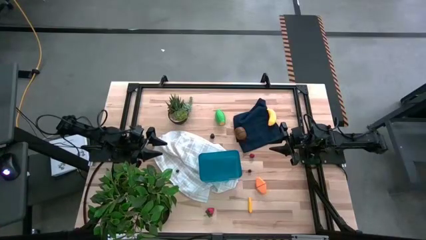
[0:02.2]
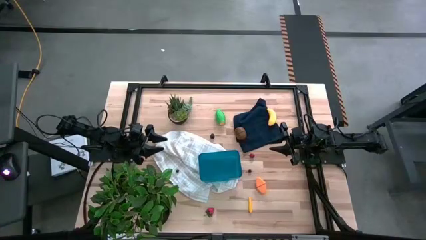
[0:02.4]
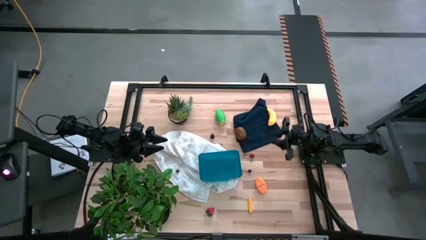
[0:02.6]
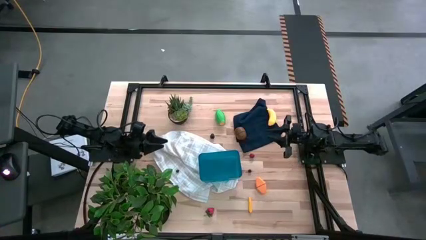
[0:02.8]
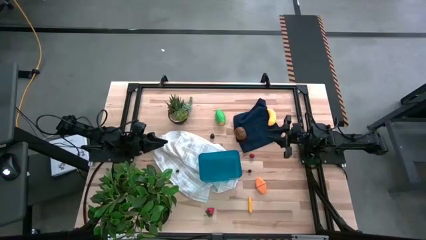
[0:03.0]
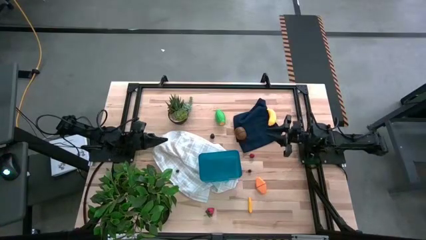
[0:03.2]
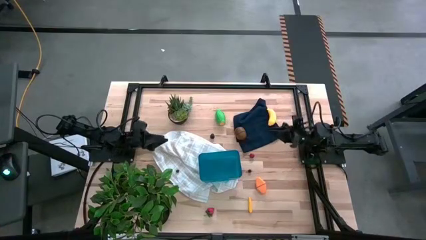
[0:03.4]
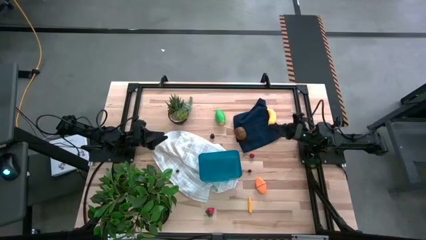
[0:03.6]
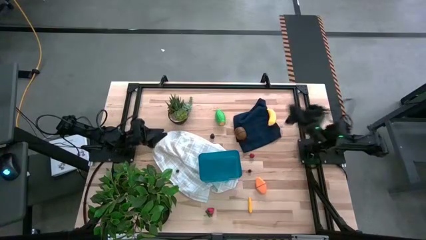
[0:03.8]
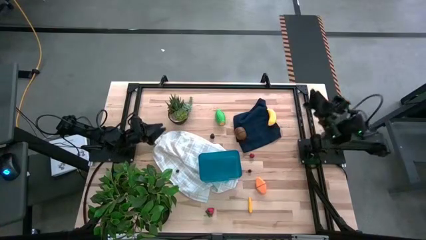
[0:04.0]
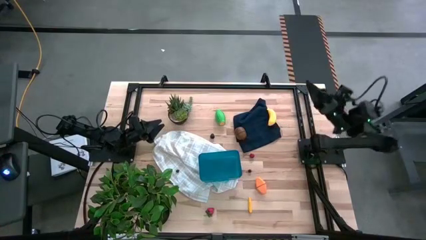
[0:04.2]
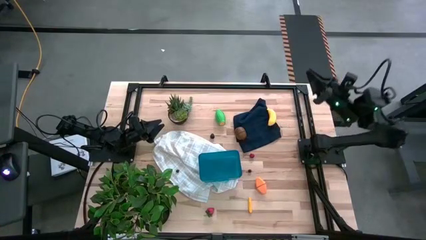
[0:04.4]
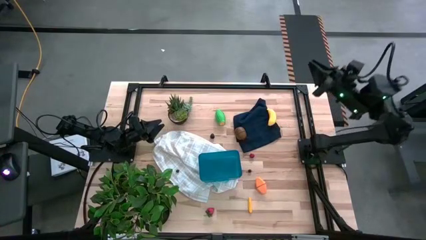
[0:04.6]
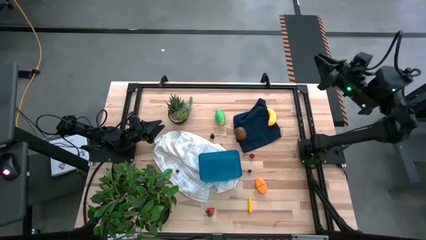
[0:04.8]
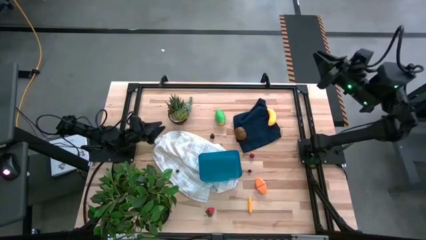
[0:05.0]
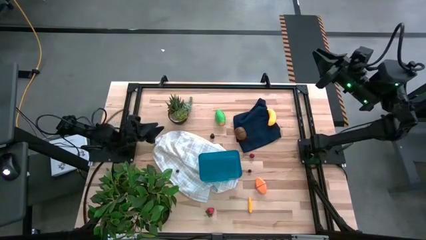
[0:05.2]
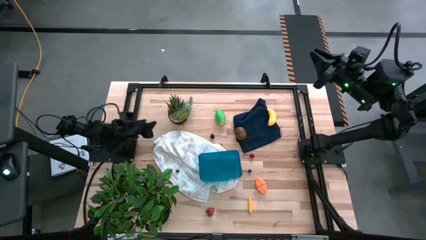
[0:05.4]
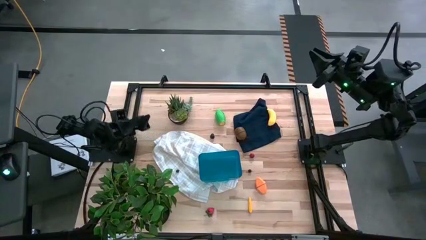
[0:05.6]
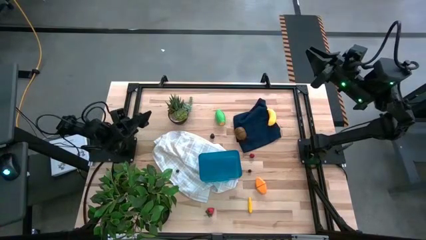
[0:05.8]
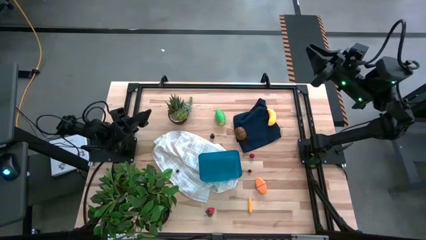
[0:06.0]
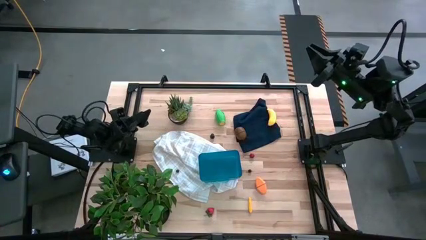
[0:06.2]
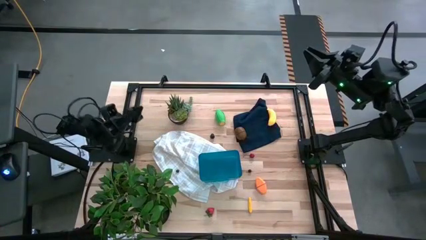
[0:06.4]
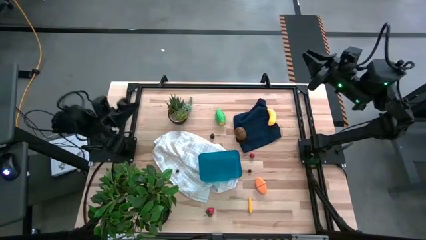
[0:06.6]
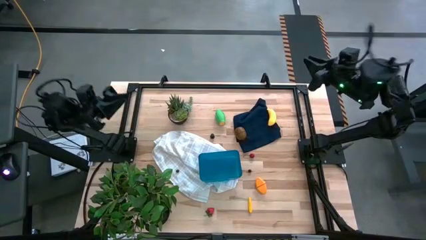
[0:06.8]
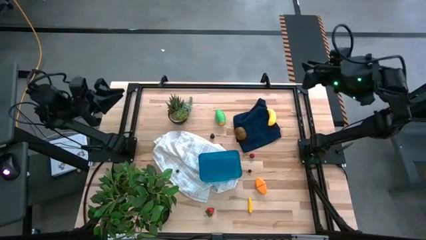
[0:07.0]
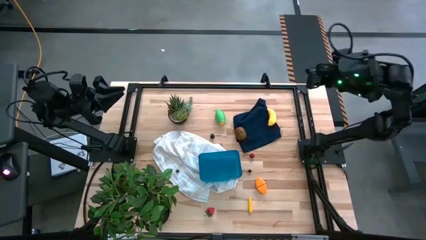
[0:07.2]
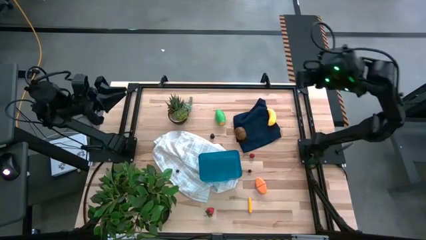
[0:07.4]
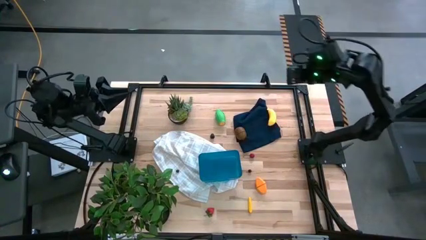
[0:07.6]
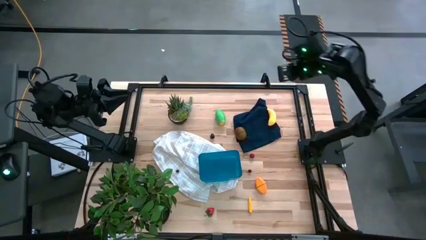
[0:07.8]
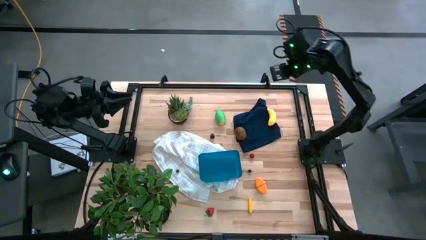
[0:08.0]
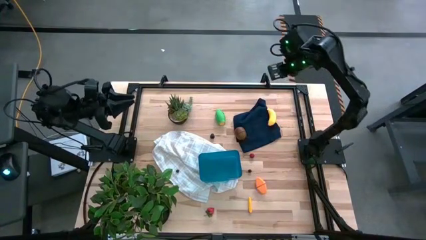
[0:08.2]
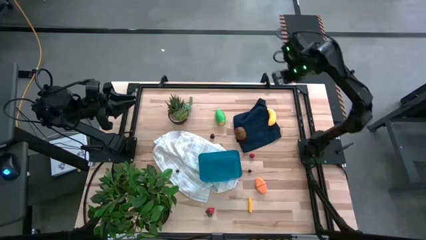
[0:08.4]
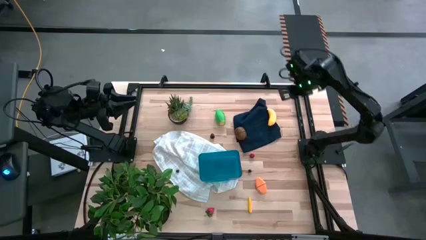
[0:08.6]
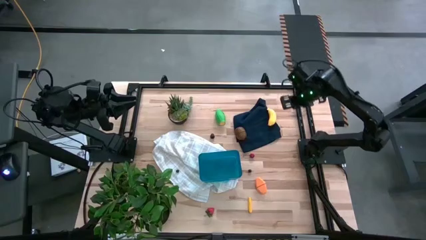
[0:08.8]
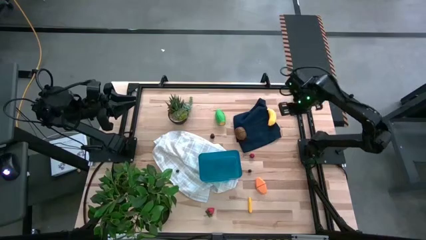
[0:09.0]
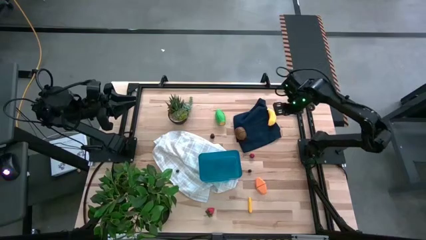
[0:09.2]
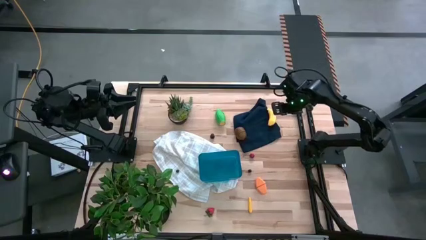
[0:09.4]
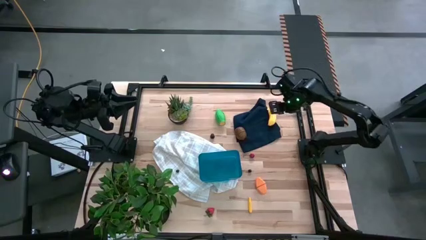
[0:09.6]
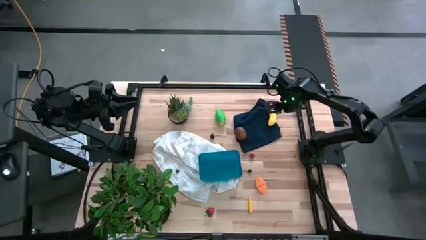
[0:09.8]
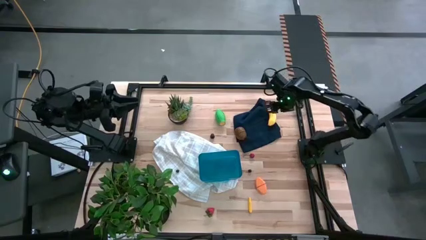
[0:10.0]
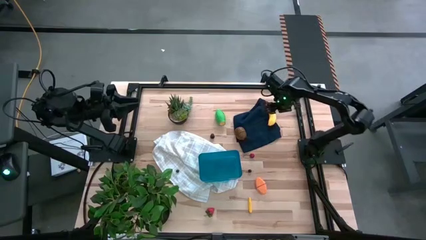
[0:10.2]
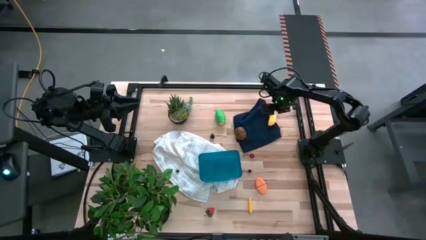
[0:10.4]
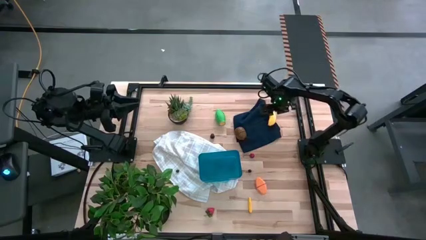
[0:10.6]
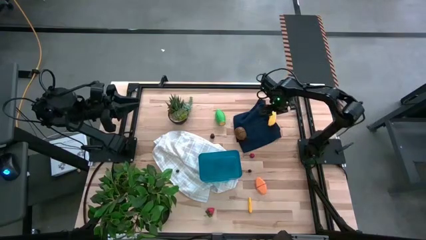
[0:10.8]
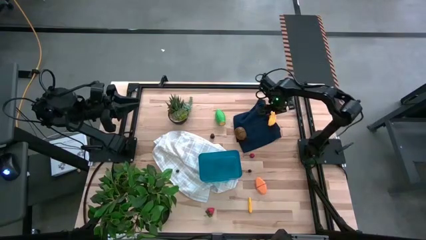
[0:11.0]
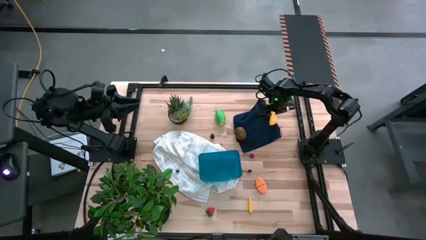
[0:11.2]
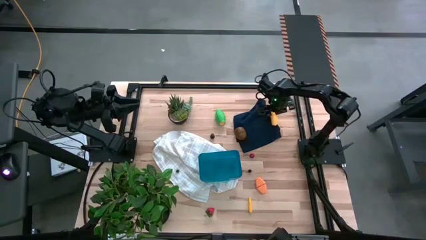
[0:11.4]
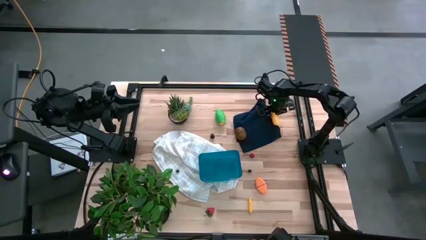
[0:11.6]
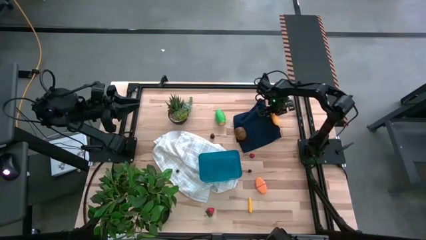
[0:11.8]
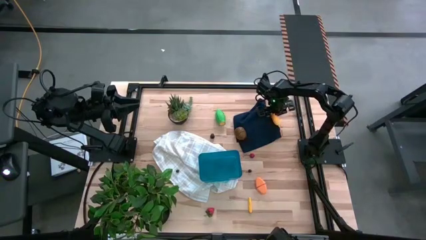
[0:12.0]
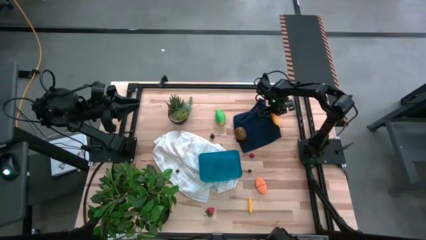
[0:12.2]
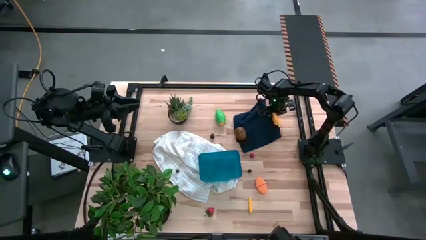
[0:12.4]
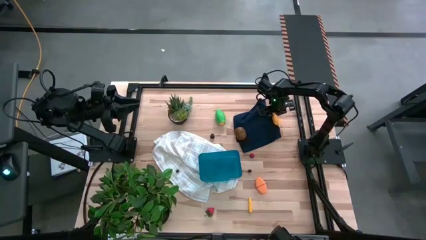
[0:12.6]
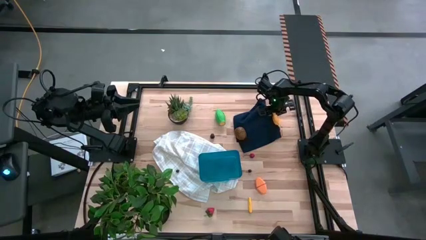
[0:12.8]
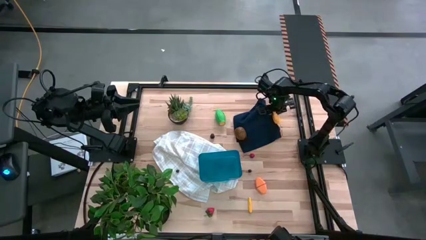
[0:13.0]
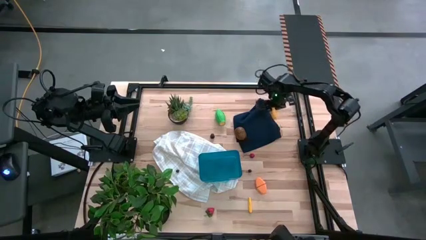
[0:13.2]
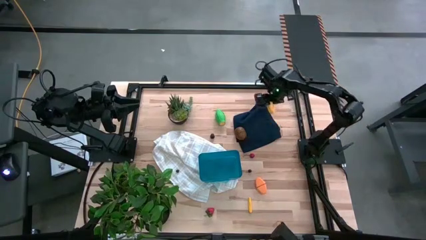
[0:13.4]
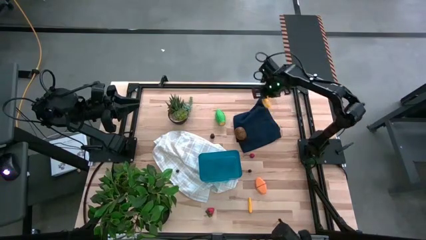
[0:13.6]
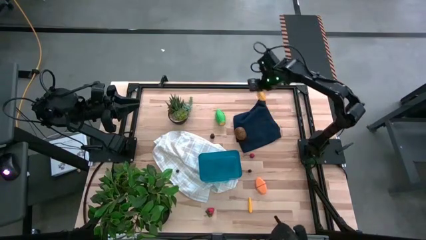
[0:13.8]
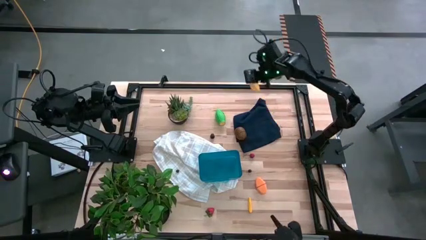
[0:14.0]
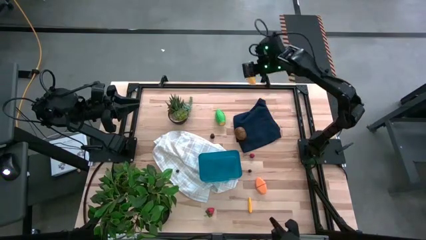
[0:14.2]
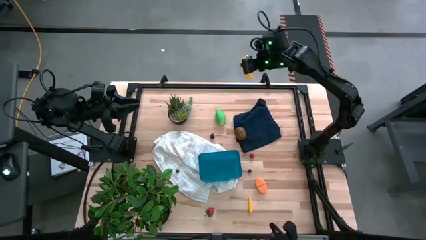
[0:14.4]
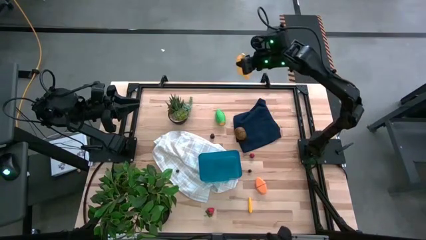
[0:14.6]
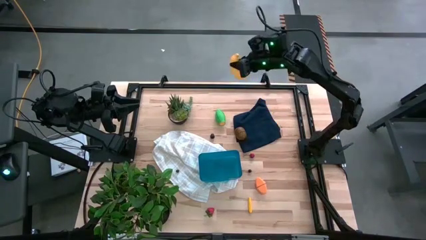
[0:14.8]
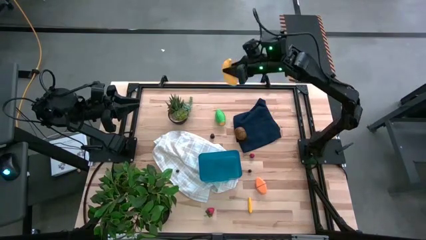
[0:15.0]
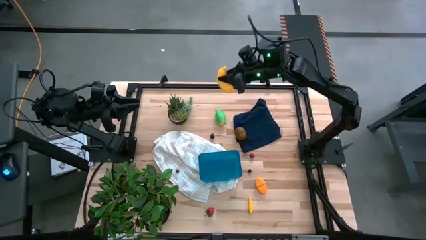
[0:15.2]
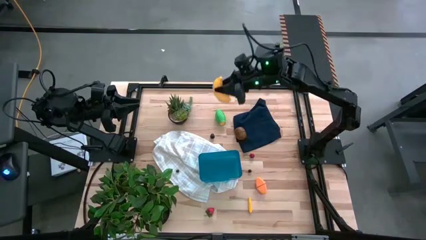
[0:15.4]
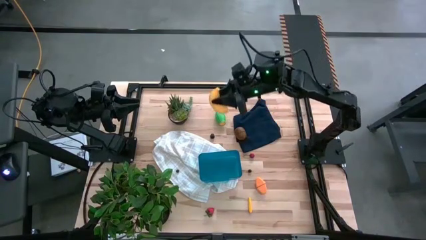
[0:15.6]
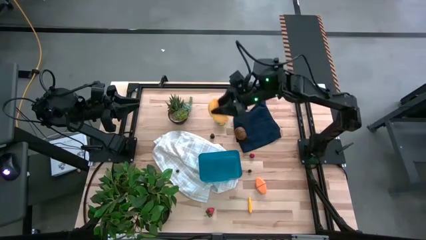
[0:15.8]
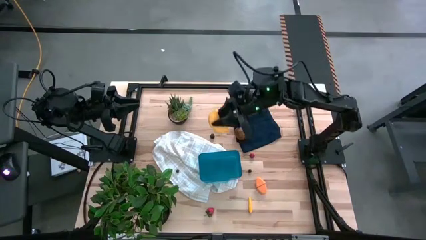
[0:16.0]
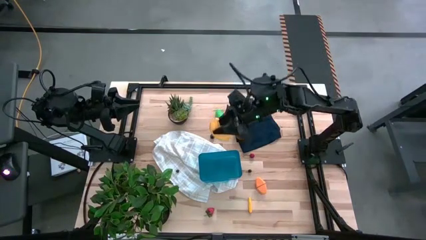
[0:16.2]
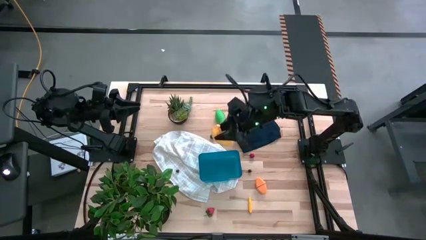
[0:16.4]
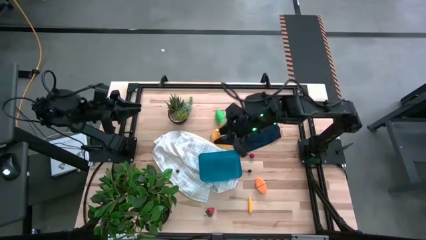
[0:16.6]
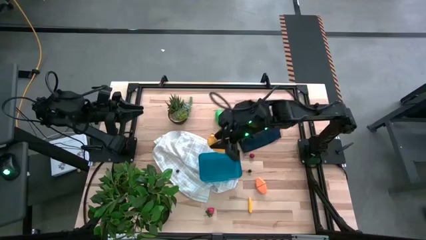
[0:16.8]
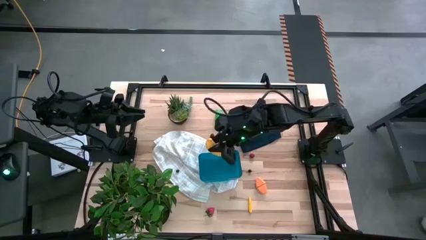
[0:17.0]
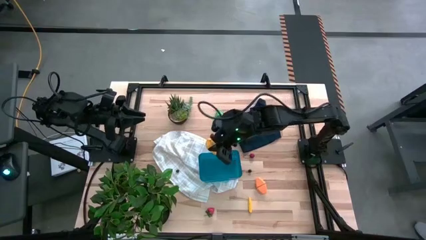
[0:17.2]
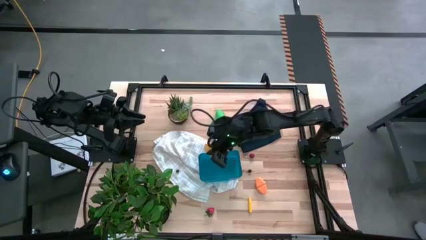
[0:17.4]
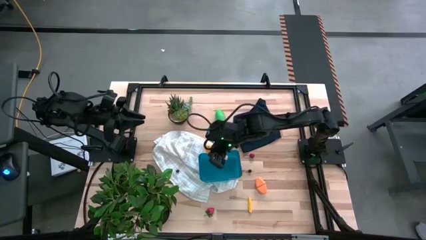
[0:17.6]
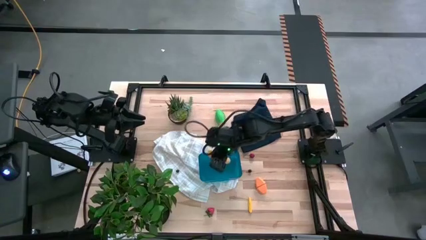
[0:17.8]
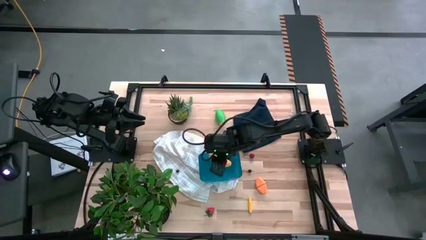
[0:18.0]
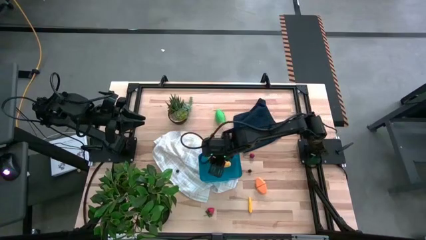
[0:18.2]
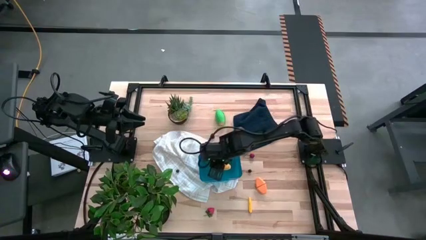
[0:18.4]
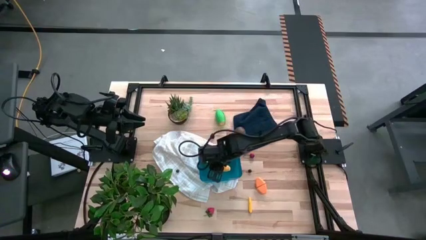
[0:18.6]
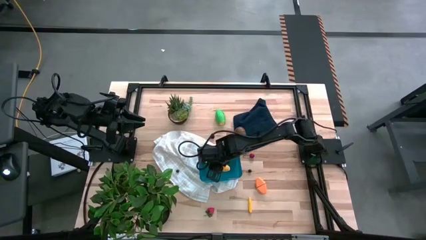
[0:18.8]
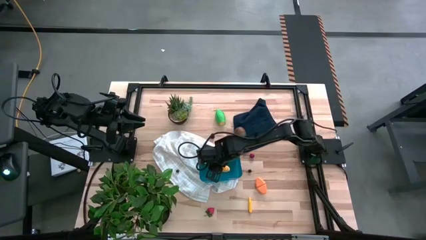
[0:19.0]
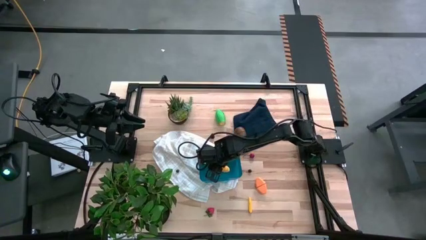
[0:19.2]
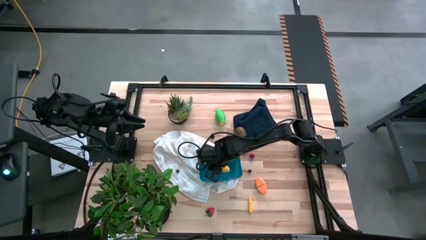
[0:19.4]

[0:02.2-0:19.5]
Task: Pick and placing Produce into tupperware
Put the yellow banana into the blue bin
